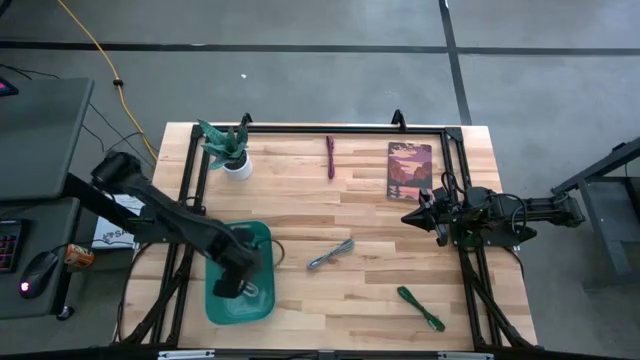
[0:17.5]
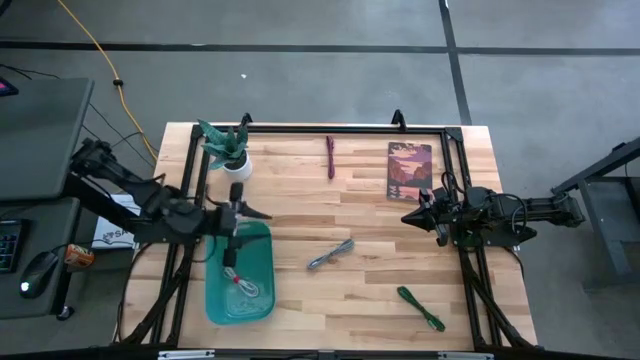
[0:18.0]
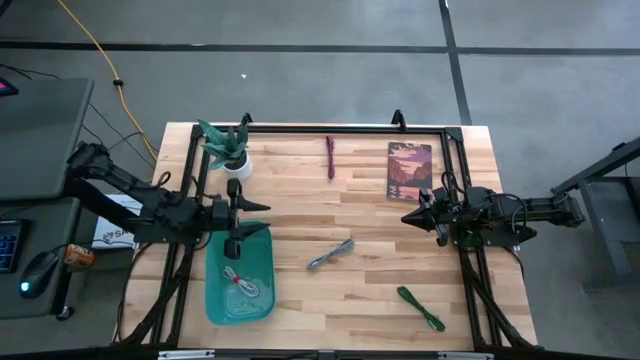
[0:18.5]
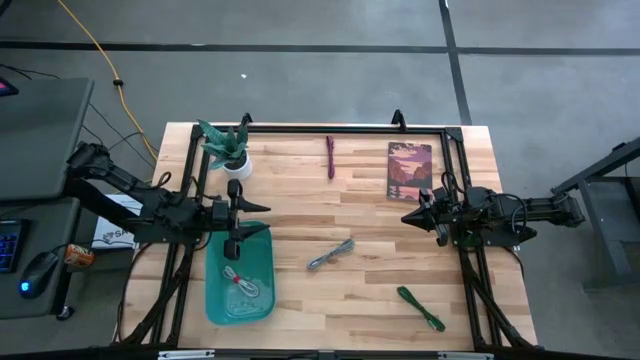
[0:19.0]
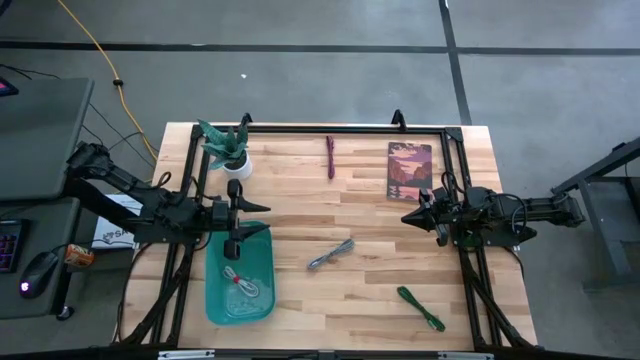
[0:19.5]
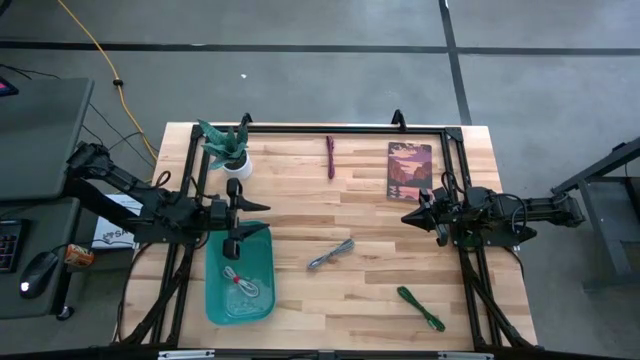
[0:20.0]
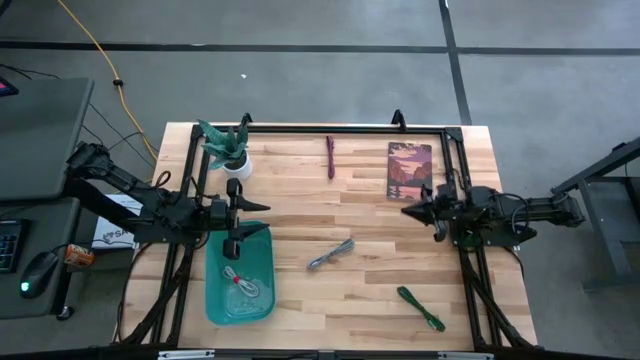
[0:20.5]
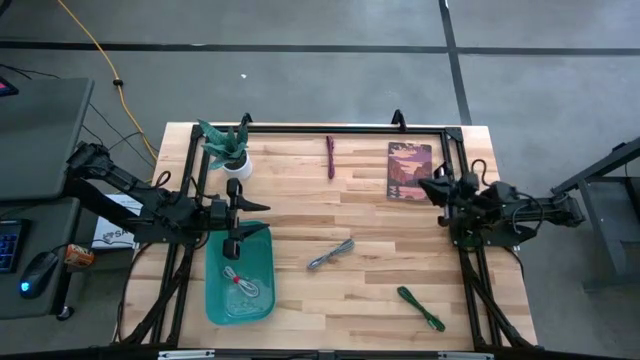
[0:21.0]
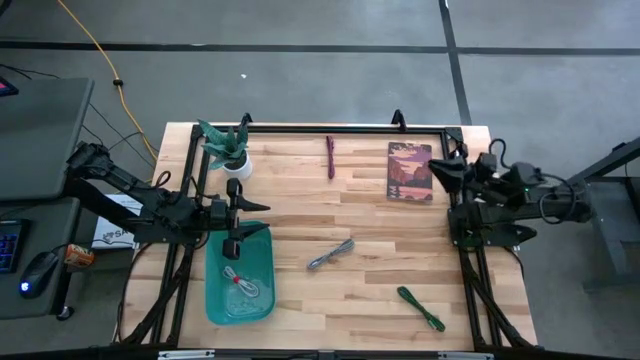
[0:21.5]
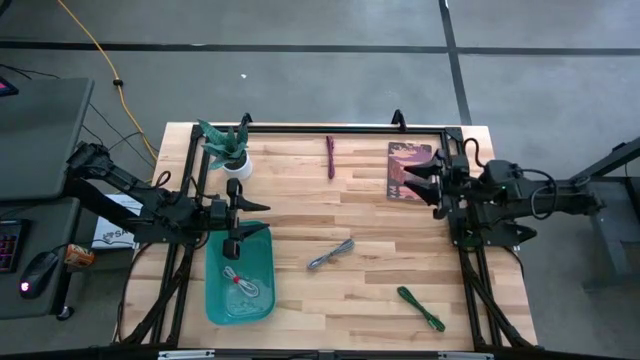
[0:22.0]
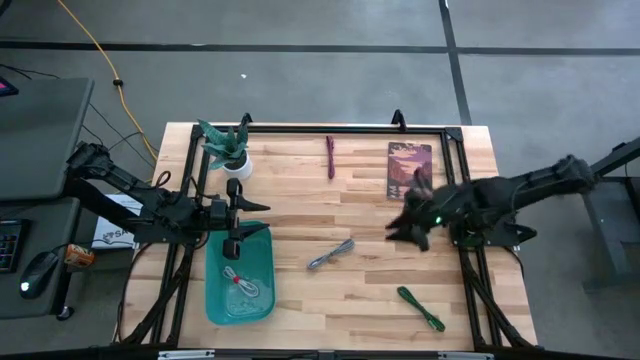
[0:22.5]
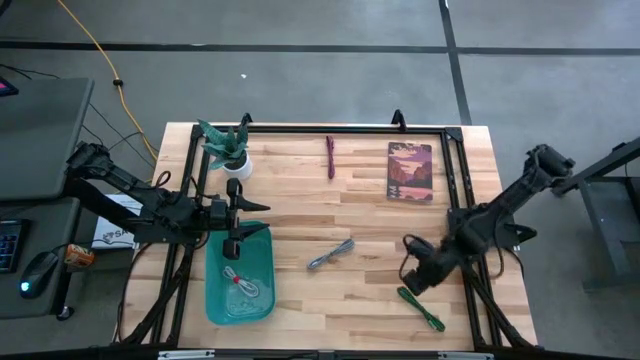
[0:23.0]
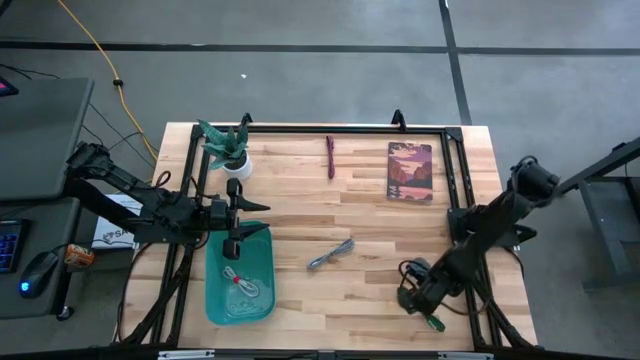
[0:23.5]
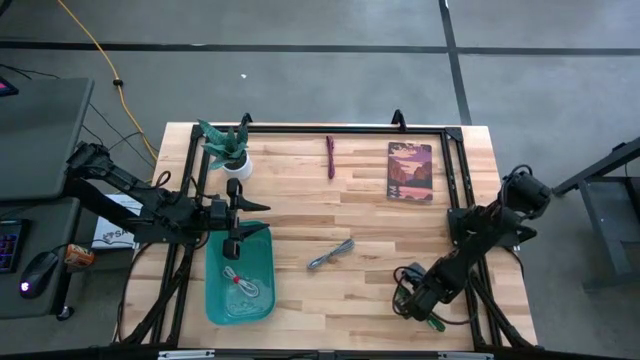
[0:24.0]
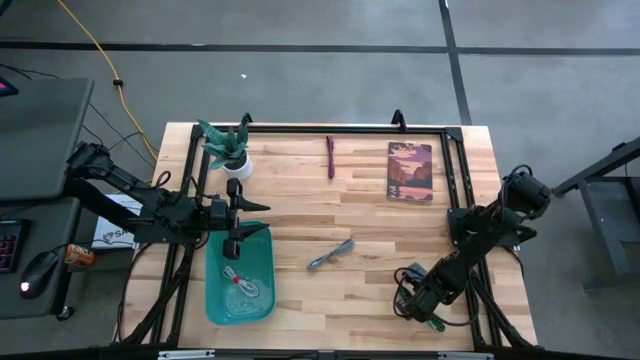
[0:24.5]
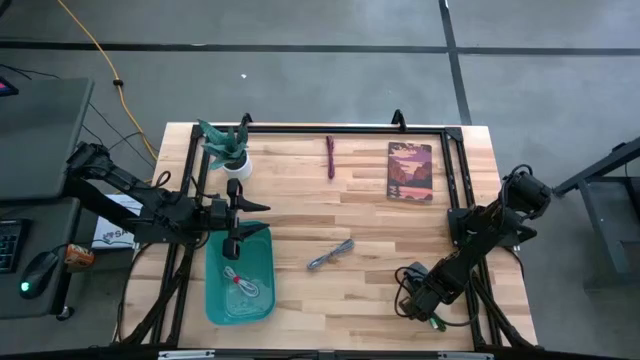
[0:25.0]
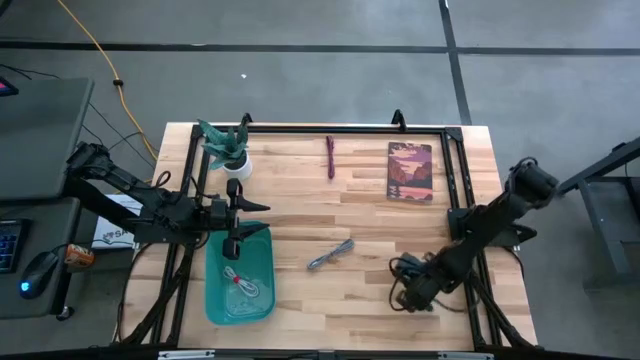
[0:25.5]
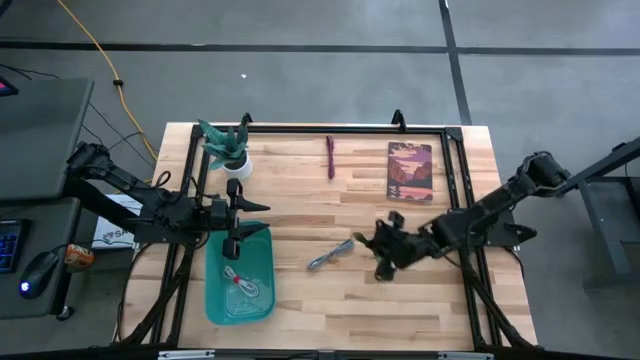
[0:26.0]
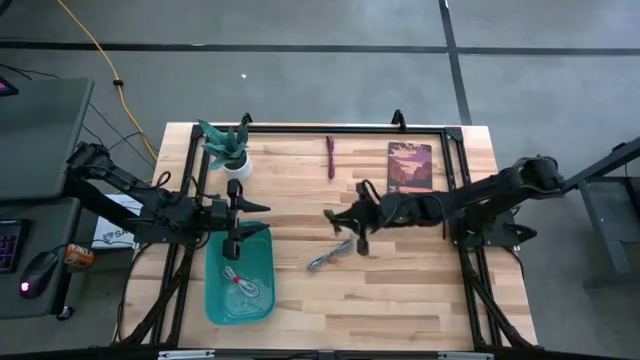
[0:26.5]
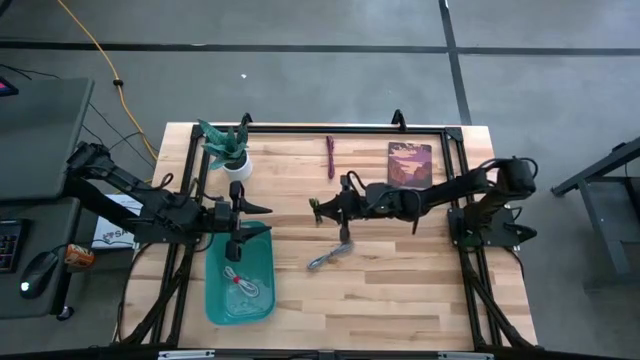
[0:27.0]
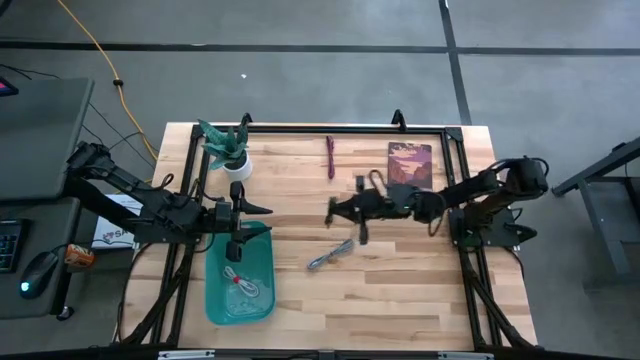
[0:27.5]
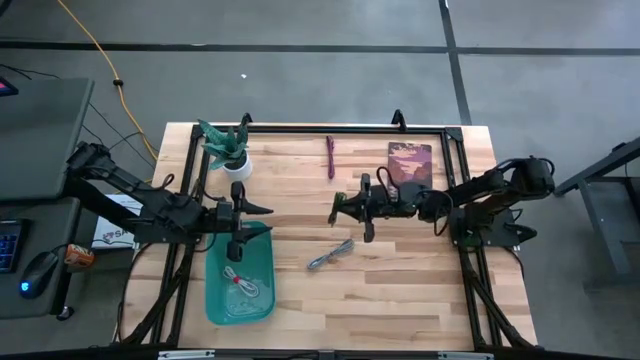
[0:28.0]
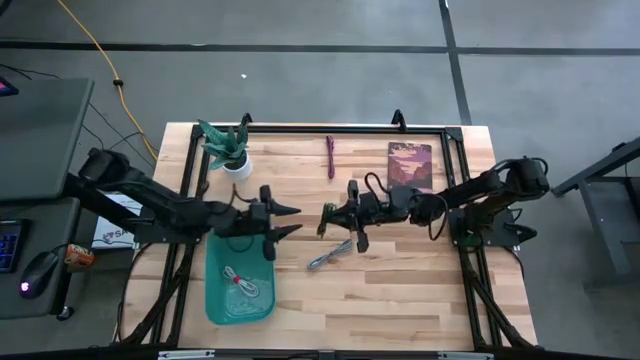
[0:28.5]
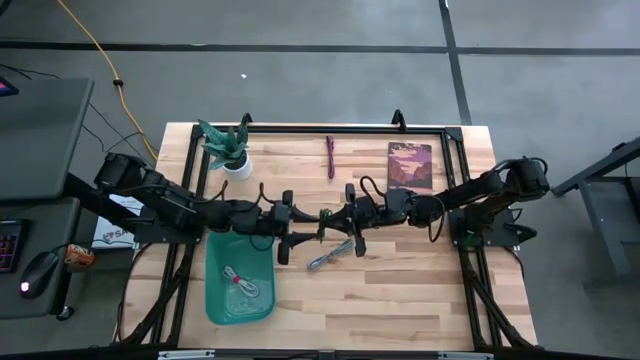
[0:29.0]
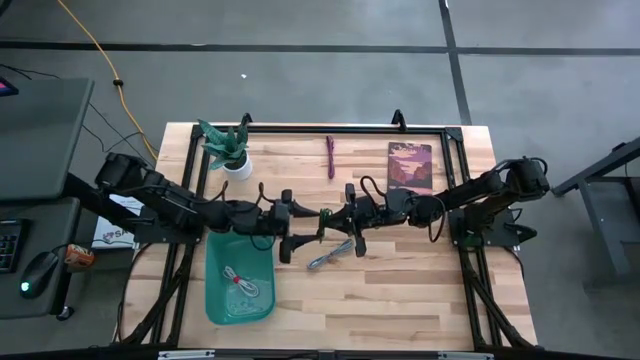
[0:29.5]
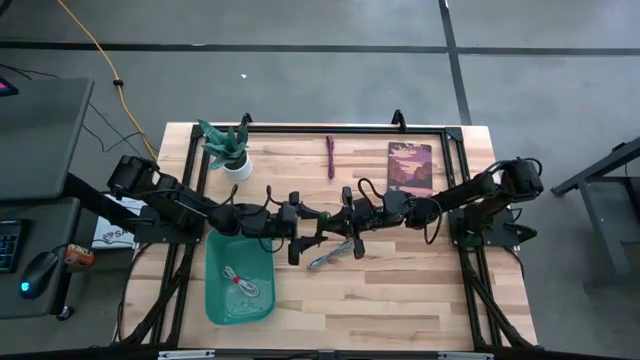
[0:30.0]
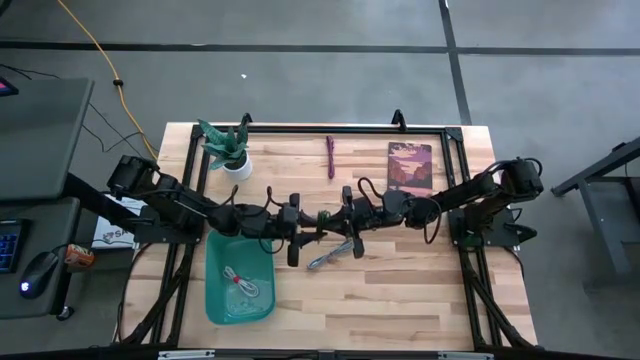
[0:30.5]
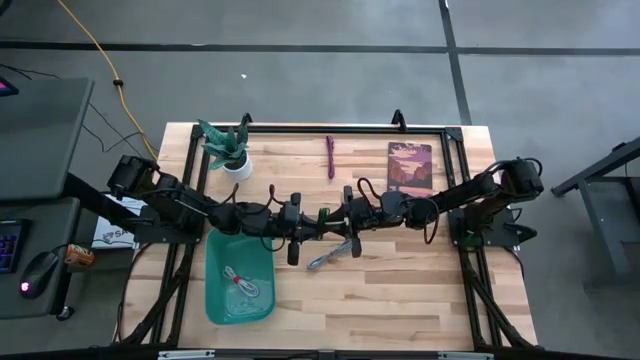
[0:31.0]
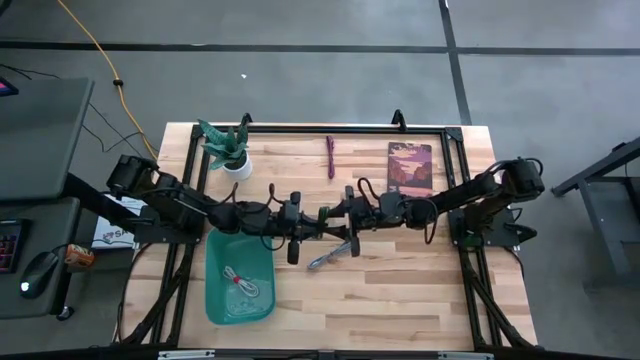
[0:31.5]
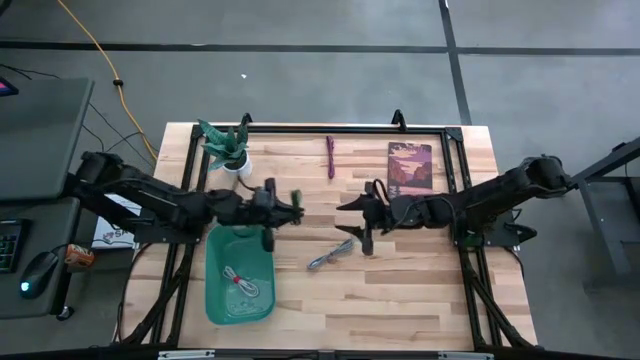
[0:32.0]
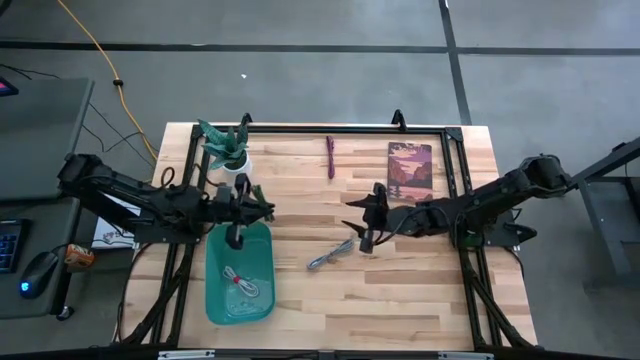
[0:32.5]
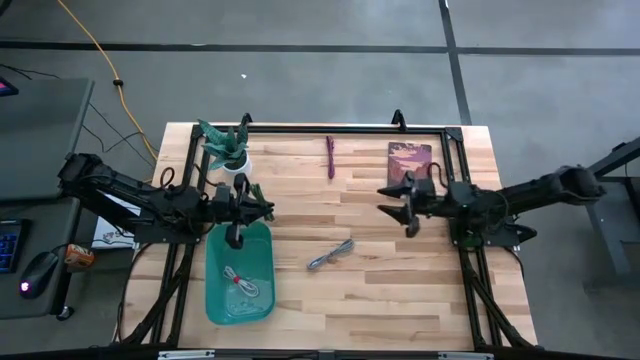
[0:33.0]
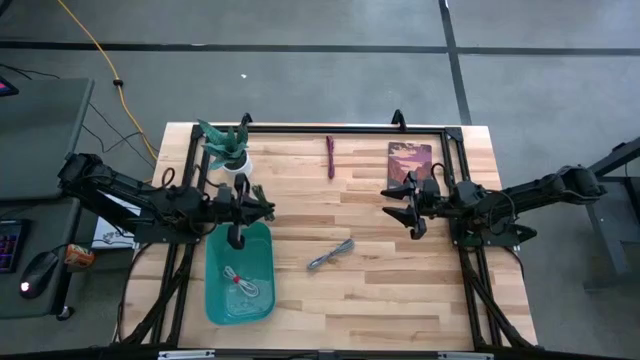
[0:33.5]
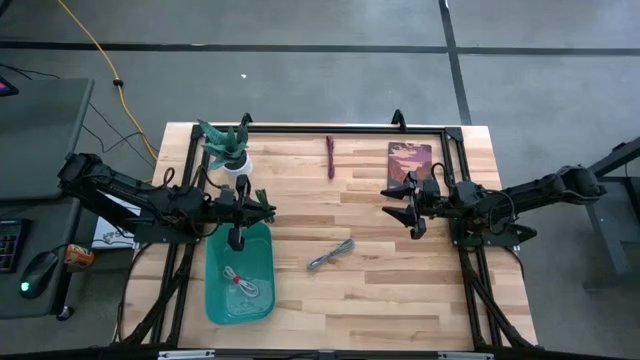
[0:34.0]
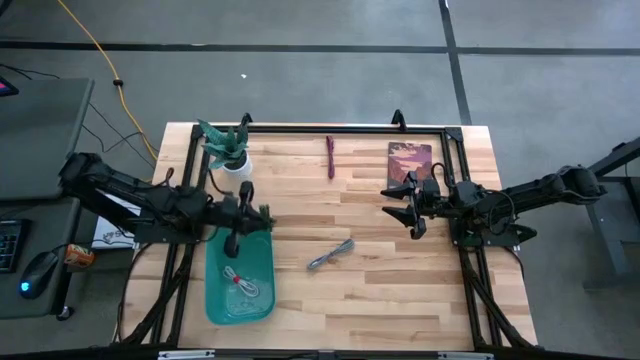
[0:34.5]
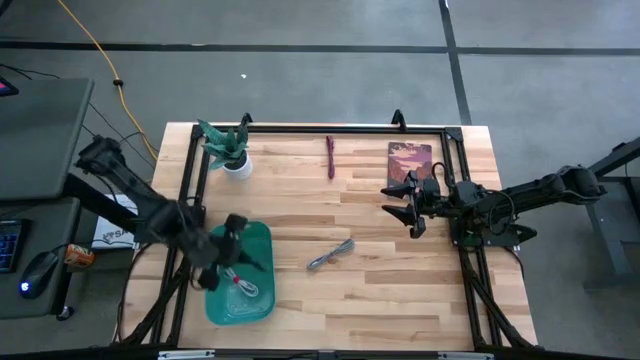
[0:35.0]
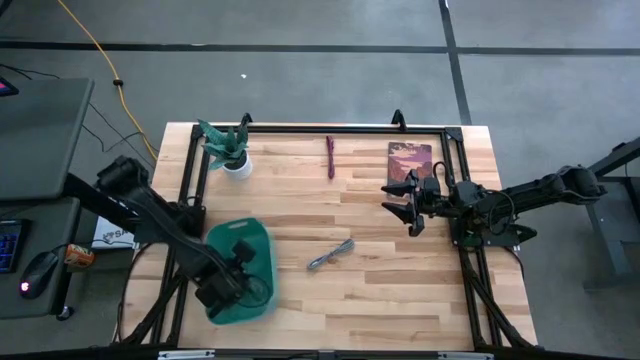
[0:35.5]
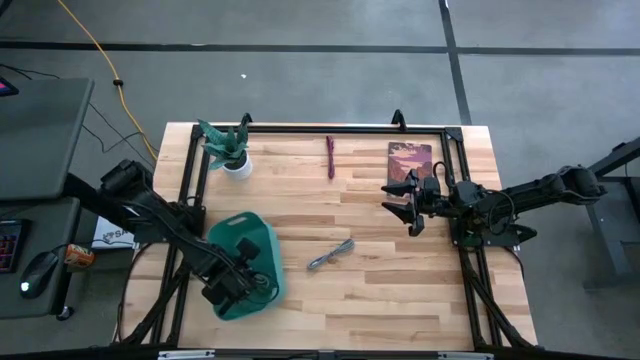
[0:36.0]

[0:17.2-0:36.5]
Task: Pick and place USB-C Cables
Put the green black charger cable into the green bin

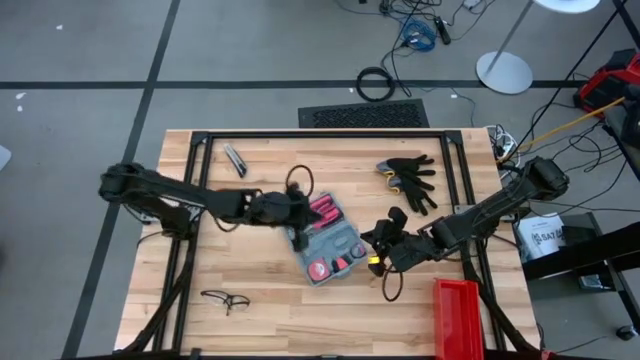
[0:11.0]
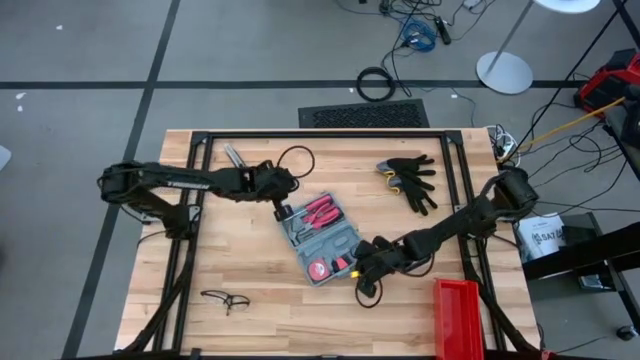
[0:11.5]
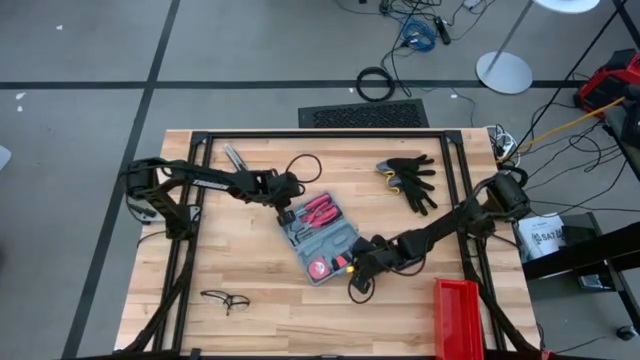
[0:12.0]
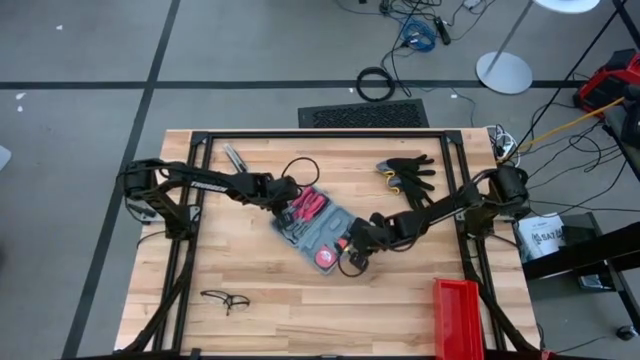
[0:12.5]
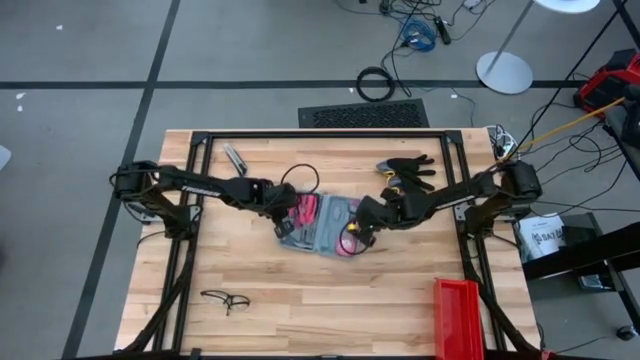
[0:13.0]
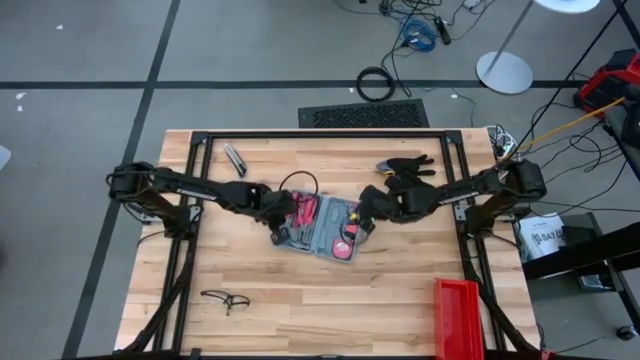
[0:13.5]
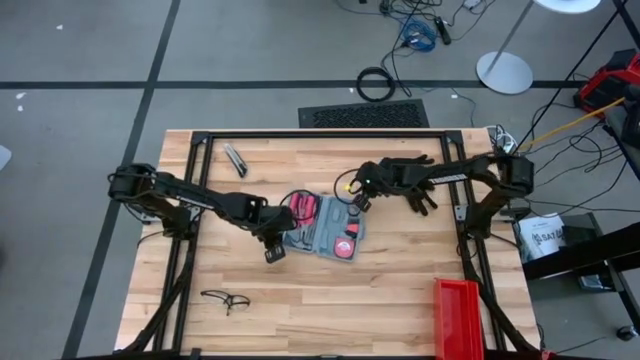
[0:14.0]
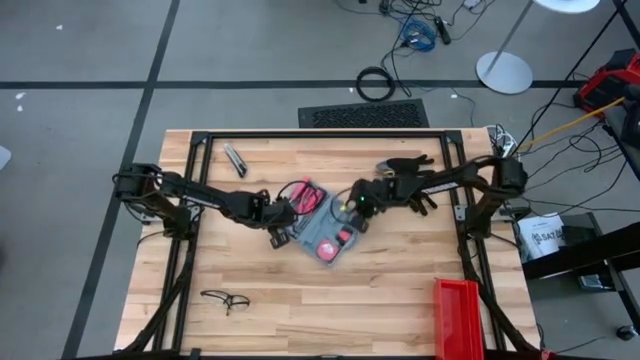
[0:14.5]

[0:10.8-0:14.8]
Task: prefit tool cases
Adjust the gray prefit tool case
